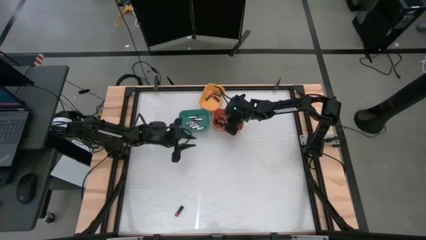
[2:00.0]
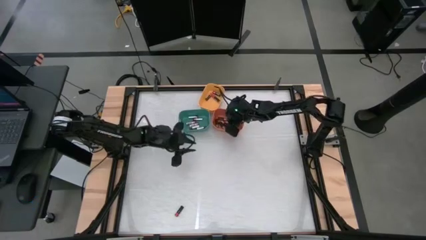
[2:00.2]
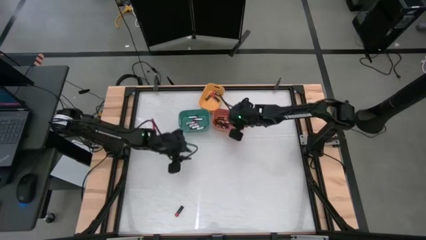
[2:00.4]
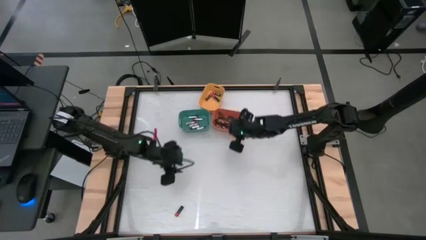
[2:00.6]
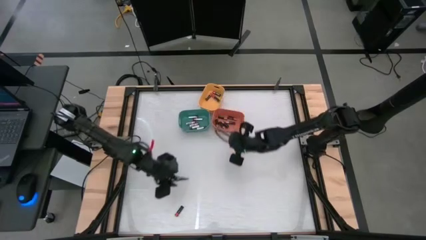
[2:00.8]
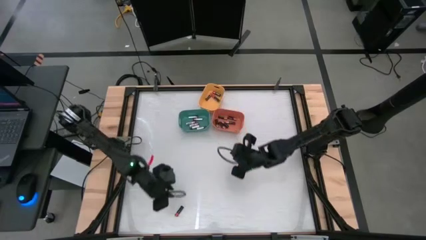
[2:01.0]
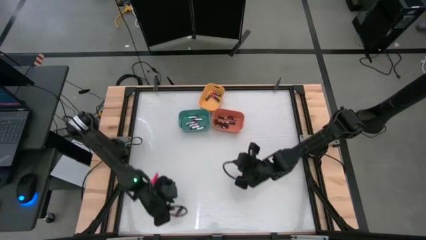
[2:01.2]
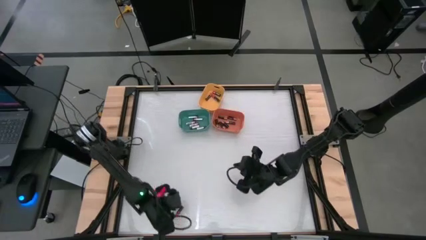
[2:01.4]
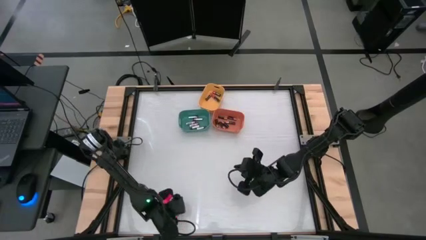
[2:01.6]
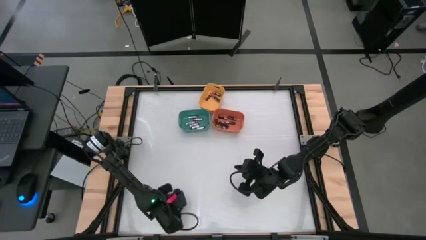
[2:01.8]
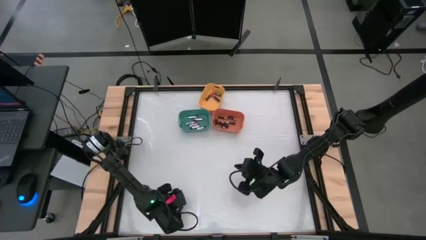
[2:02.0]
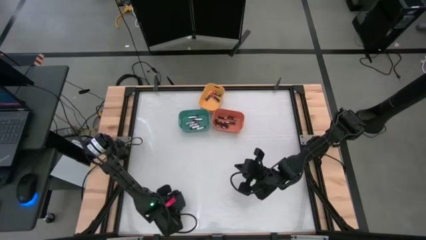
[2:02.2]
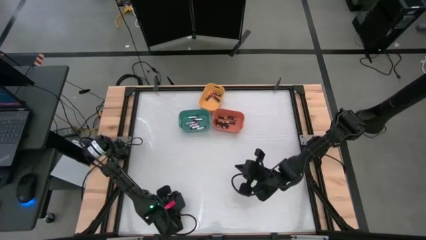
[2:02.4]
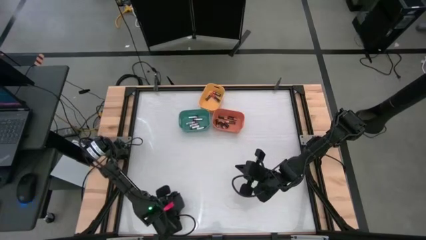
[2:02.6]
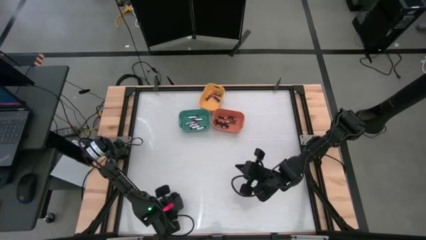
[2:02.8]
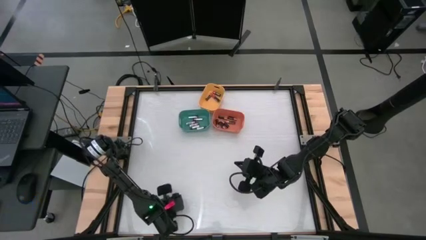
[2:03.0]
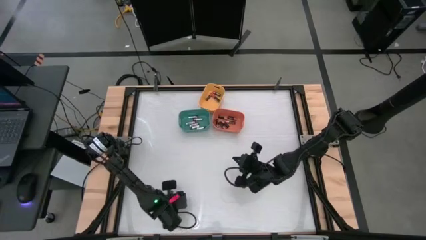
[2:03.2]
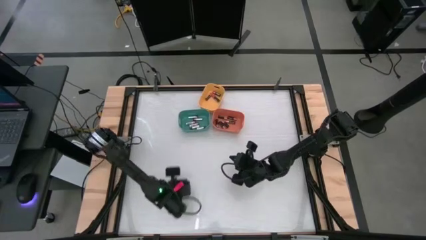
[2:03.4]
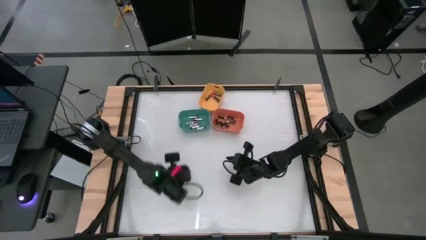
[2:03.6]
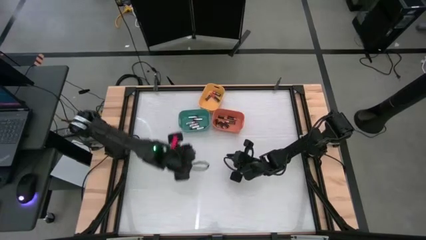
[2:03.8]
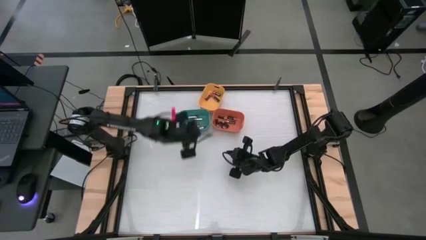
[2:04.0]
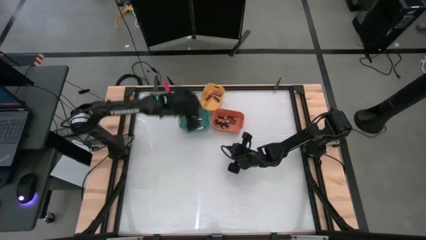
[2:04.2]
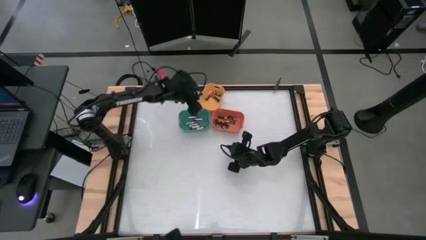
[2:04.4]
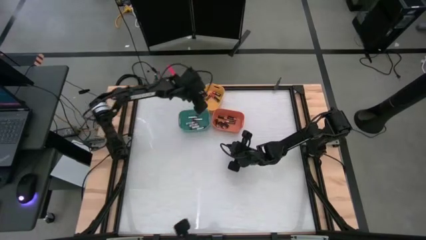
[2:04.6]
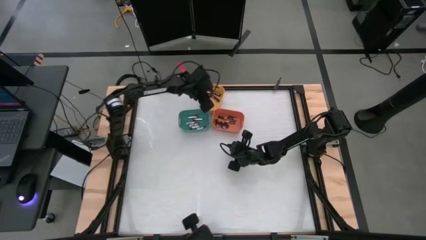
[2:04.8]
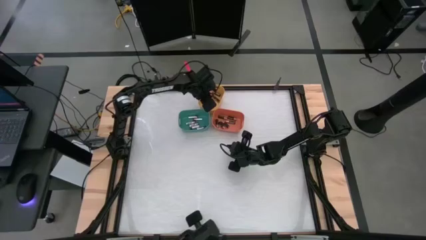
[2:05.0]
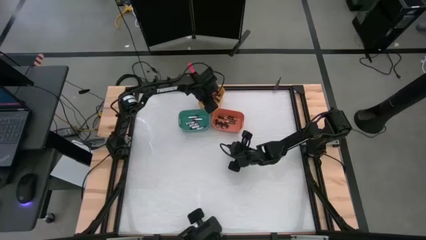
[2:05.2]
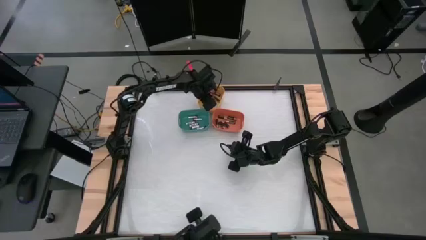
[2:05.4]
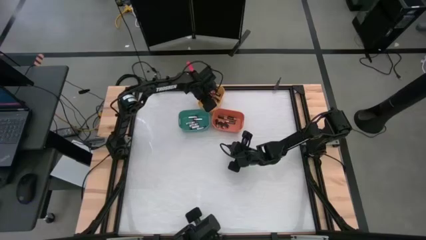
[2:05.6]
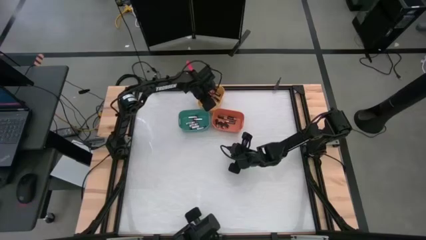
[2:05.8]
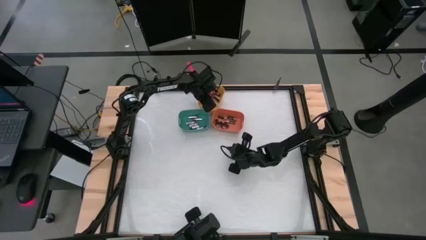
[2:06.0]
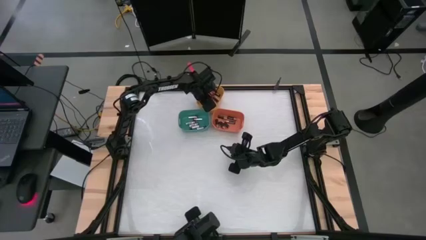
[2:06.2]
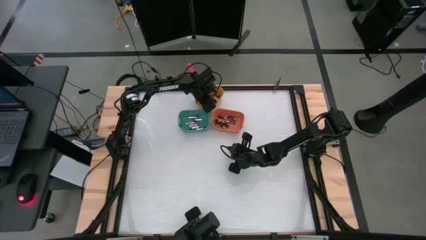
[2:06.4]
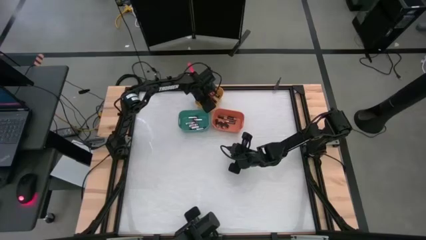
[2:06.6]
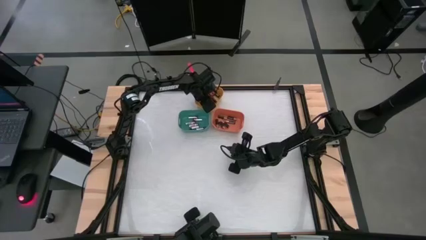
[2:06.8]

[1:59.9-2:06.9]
Task: Sort batteries
Put the red battery into the yellow bin

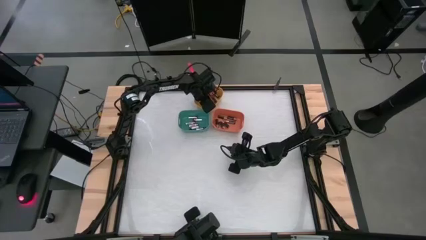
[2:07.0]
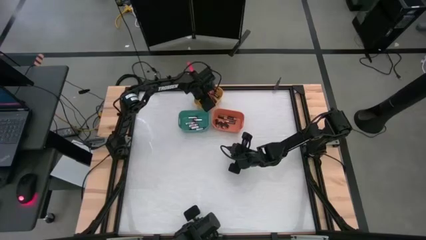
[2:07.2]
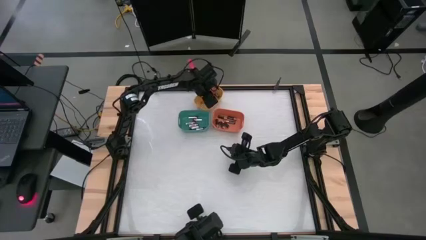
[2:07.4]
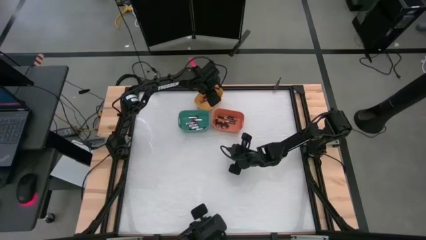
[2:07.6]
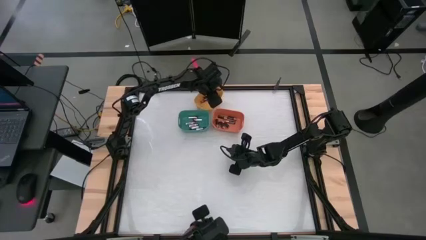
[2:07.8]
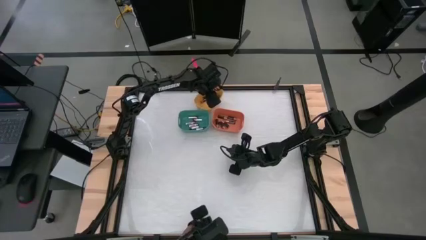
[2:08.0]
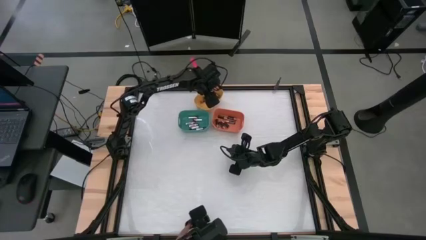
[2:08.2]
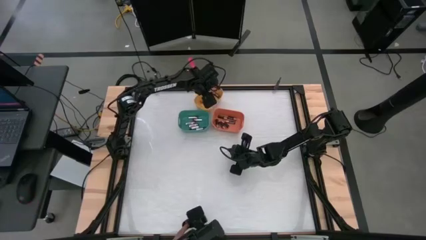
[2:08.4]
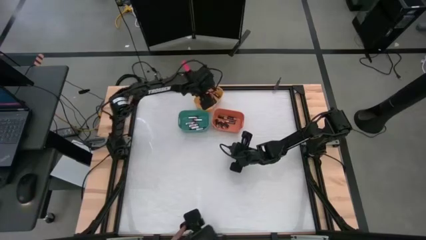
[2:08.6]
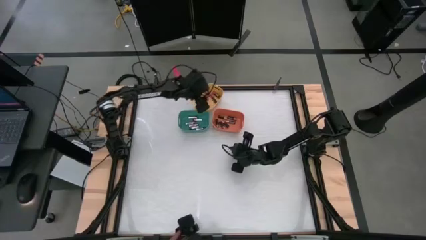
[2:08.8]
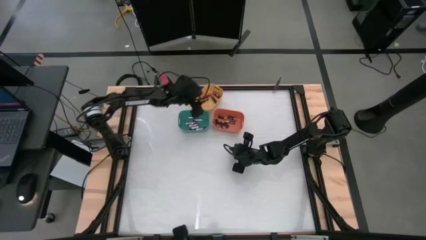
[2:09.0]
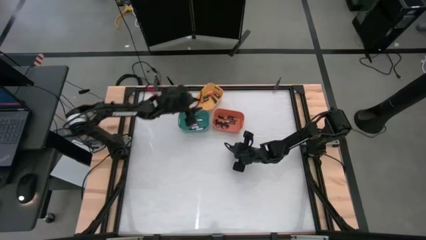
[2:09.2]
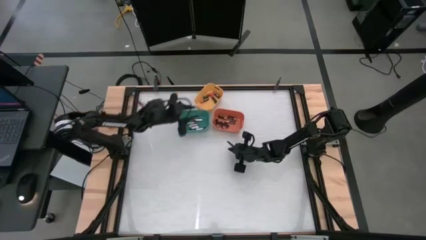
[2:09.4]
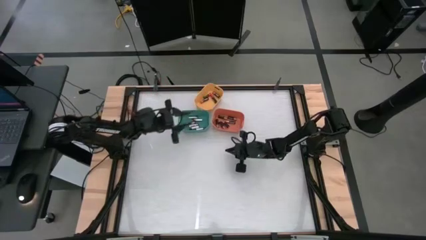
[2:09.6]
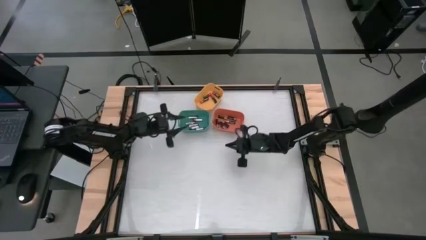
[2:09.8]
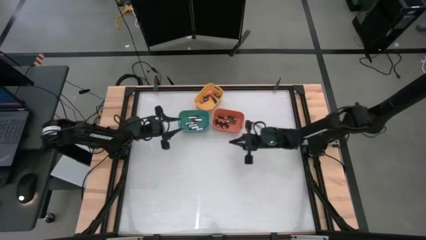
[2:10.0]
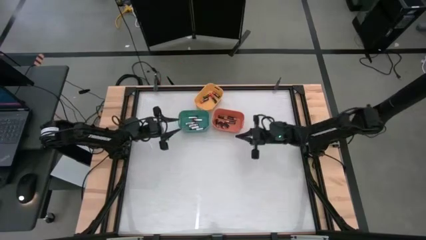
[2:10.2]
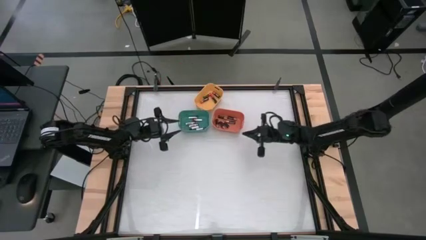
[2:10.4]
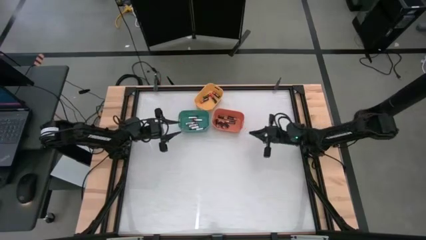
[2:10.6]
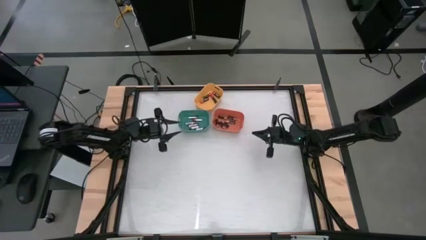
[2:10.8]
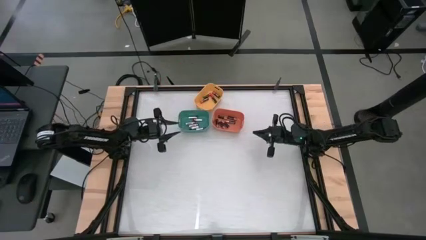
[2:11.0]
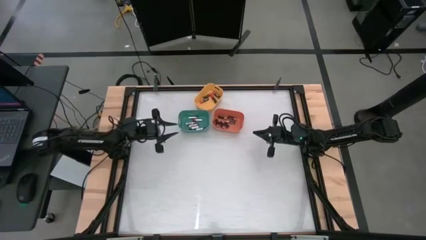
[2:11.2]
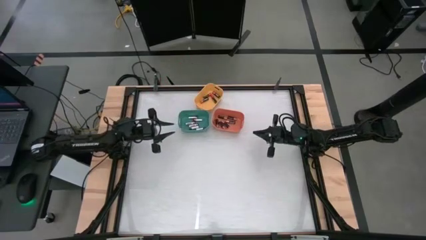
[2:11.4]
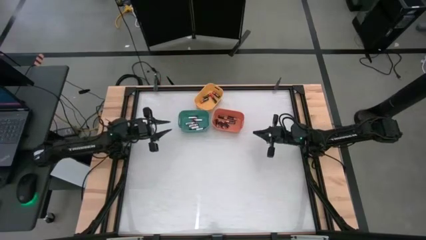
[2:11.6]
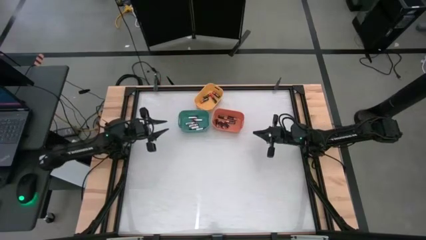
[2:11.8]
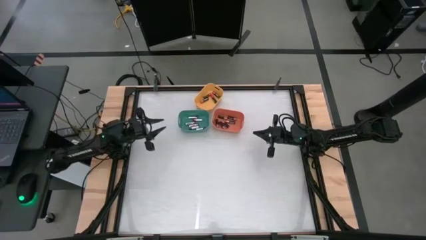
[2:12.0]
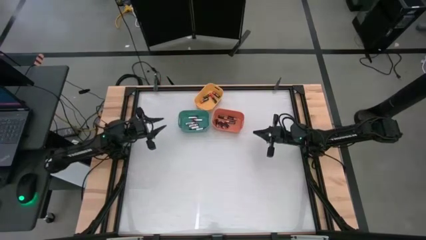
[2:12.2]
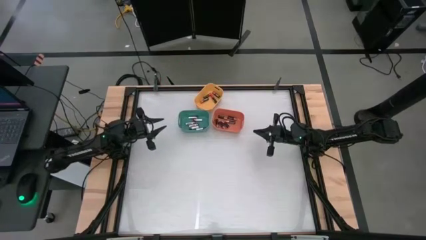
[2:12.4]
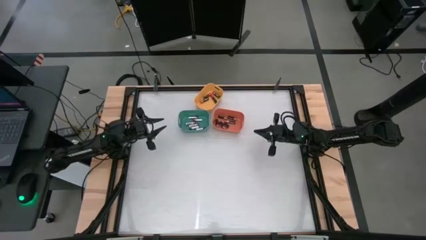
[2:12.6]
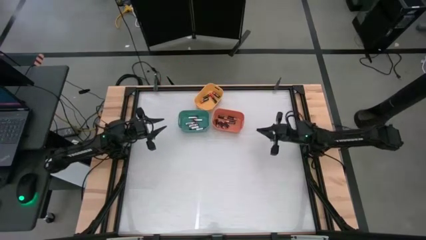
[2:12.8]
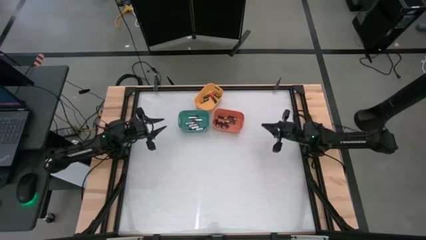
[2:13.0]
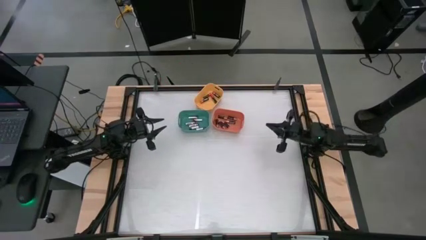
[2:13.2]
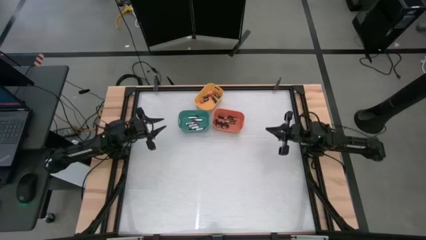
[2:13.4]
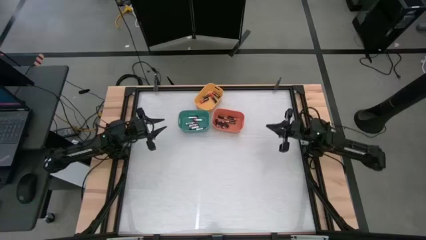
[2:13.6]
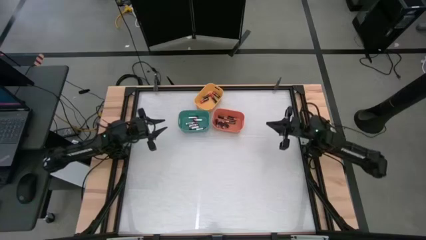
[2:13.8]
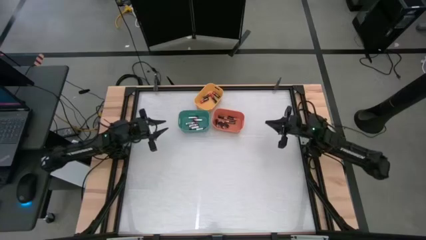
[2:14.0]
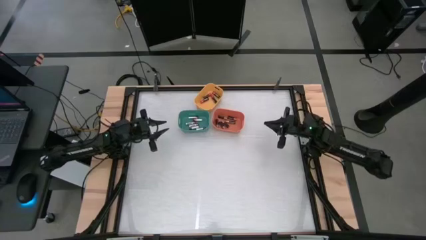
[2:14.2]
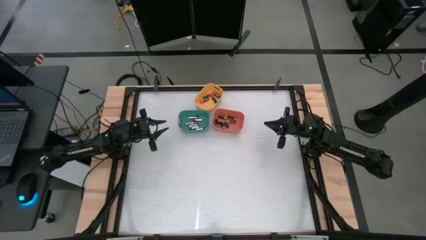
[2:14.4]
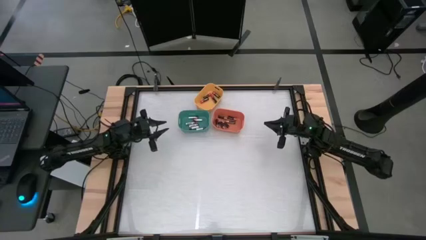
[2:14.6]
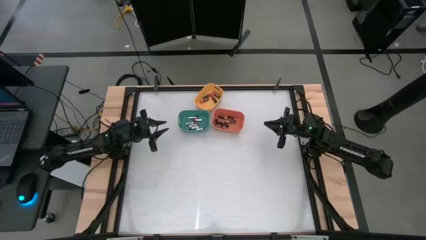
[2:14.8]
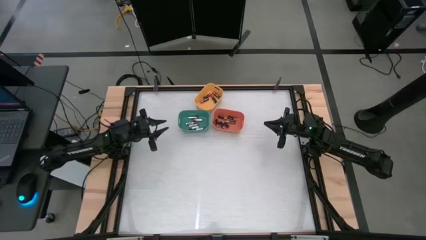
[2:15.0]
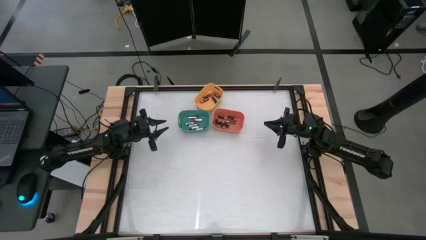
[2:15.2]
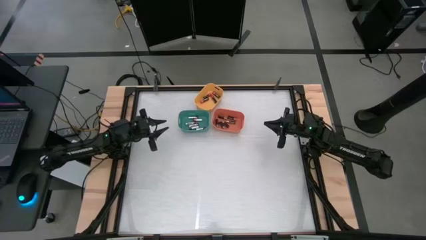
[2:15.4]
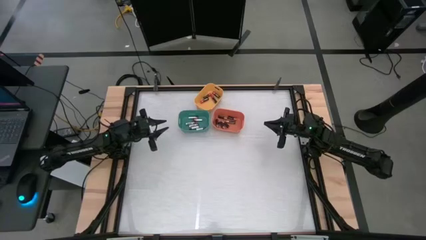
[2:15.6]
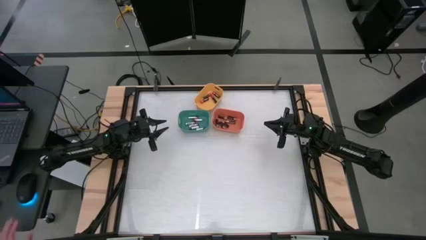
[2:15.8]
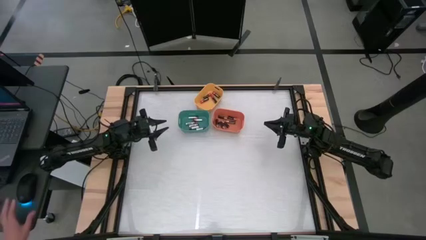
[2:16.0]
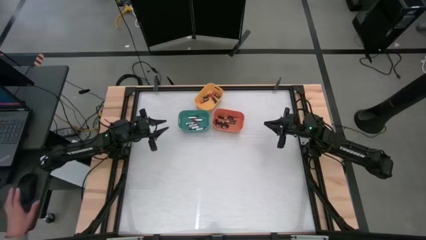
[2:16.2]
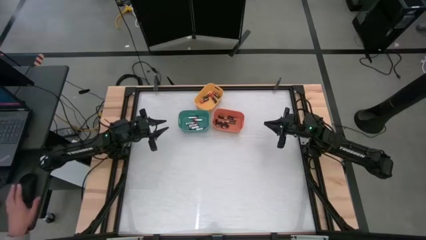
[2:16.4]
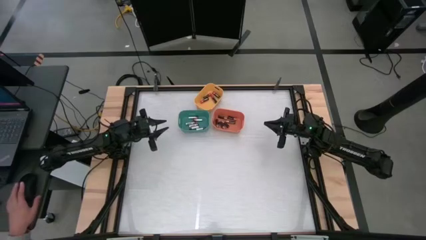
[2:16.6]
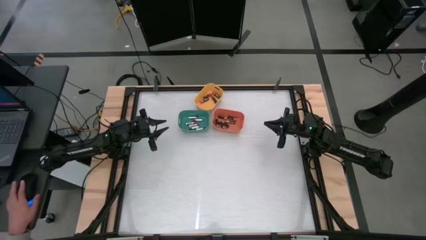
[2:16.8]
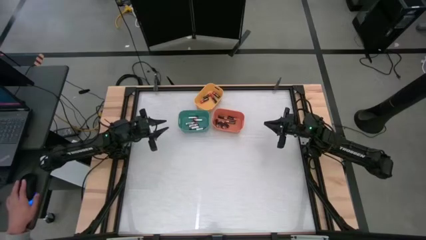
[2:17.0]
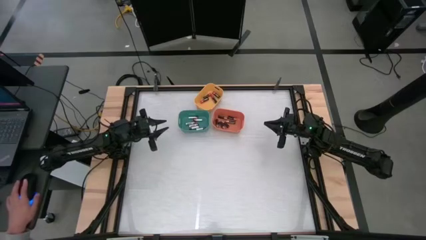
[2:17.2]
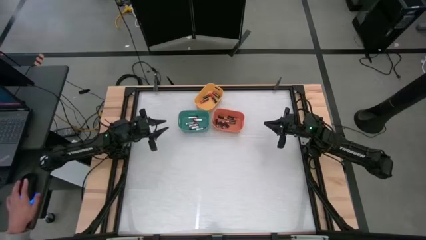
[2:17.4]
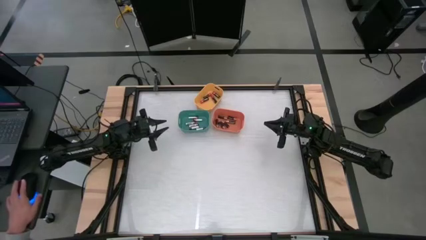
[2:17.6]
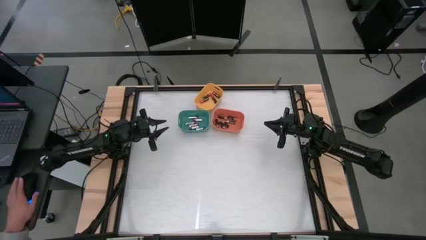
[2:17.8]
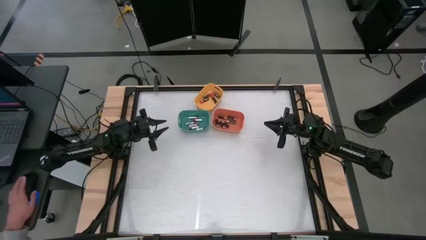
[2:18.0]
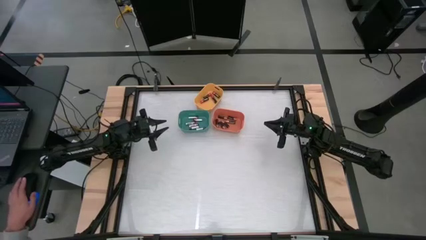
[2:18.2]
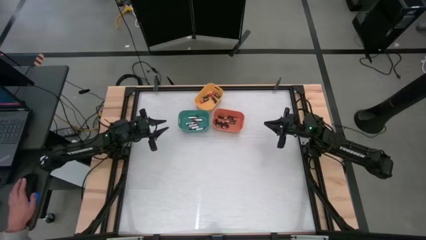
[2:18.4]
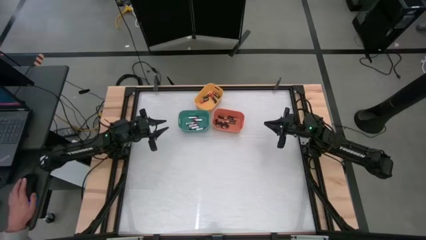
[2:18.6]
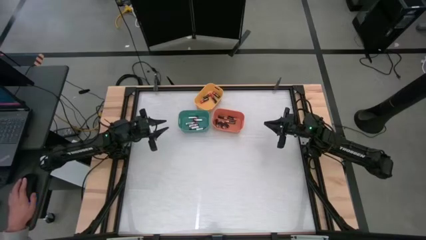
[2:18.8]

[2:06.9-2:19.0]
Return to Home Position
